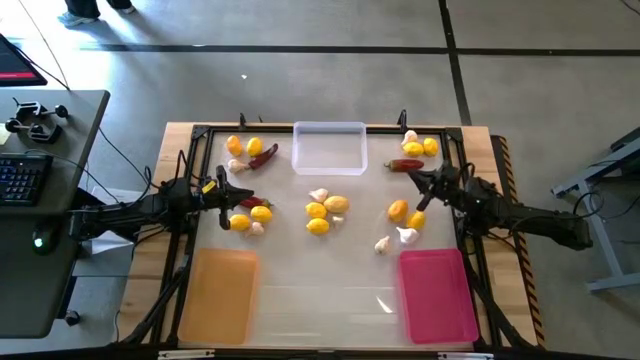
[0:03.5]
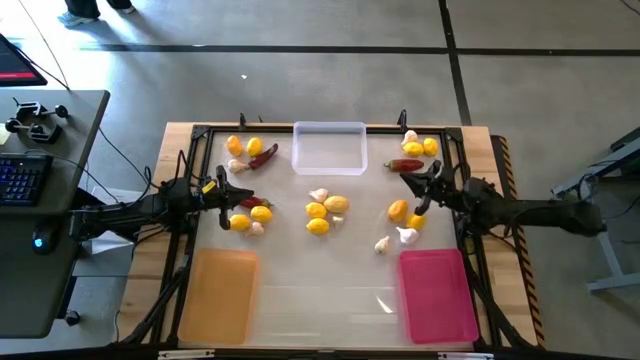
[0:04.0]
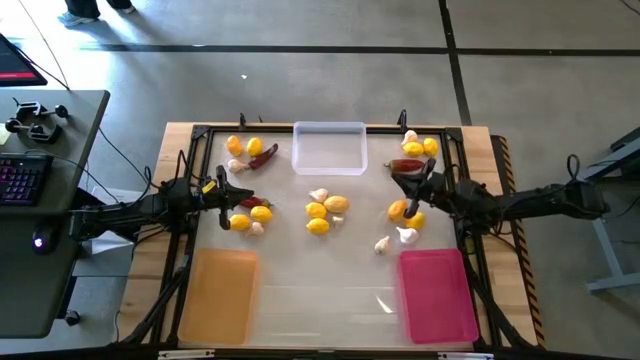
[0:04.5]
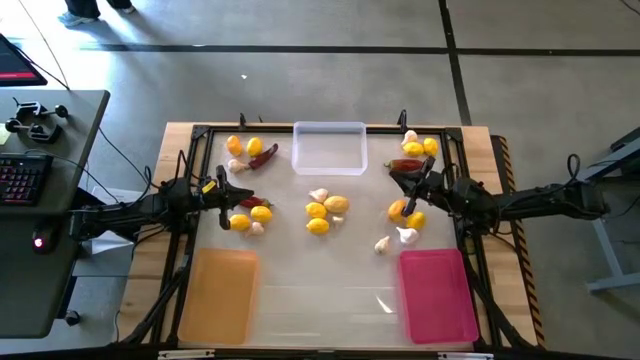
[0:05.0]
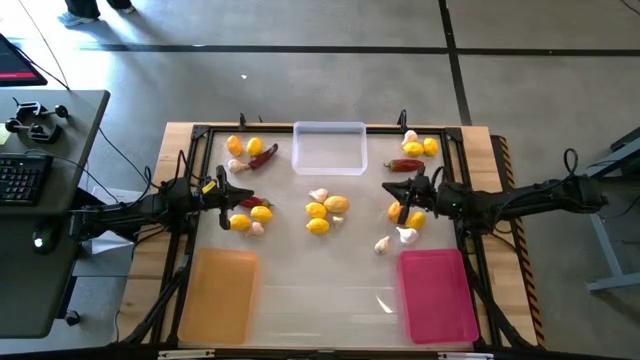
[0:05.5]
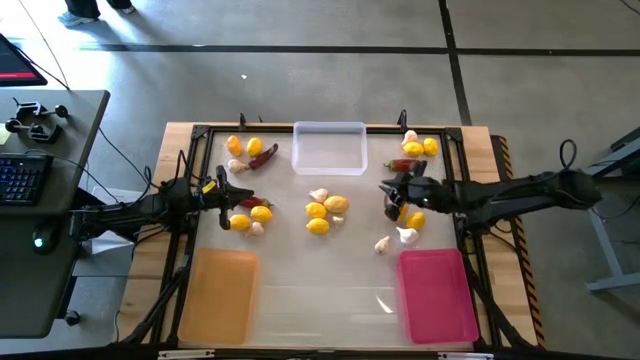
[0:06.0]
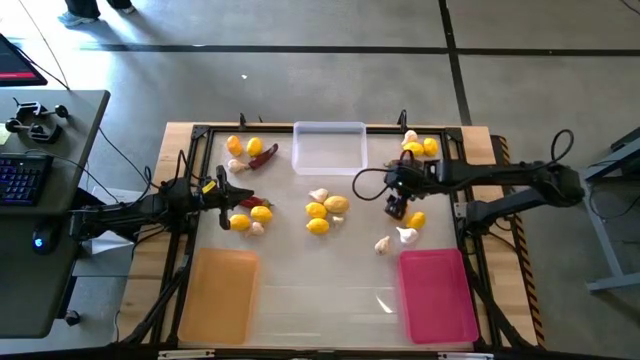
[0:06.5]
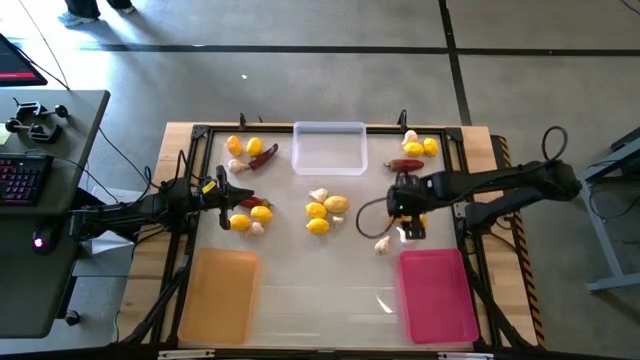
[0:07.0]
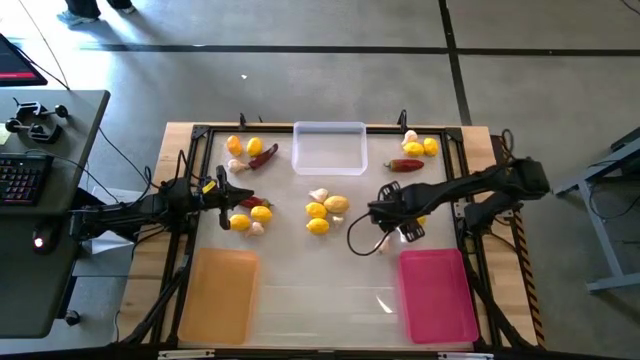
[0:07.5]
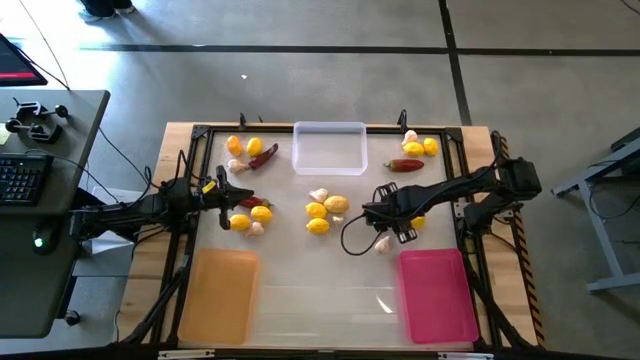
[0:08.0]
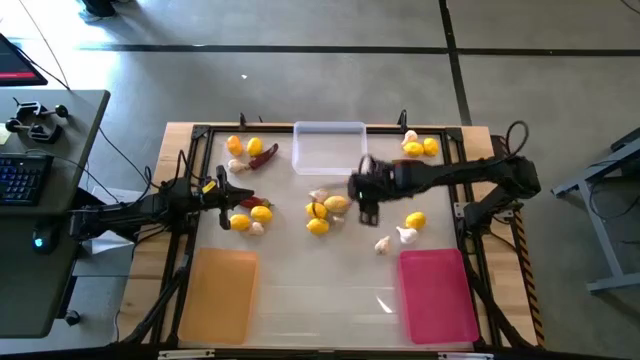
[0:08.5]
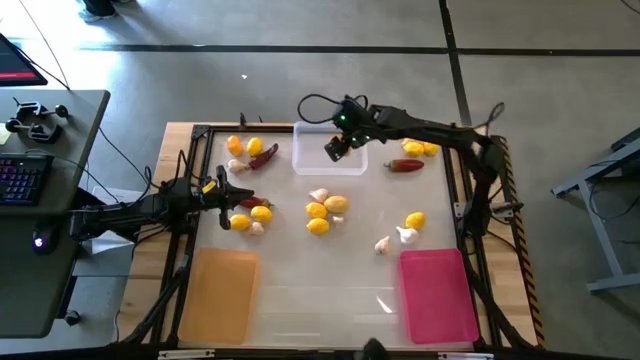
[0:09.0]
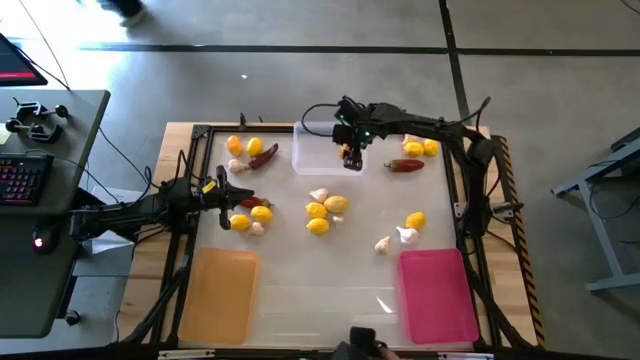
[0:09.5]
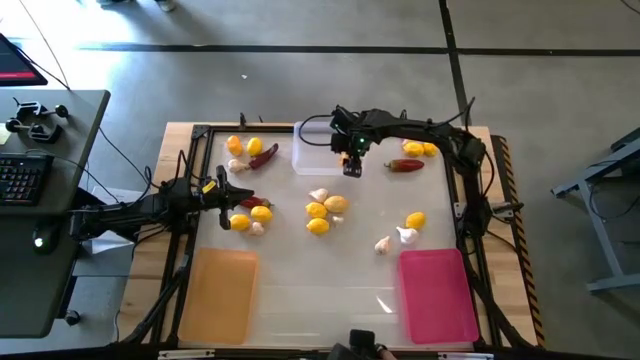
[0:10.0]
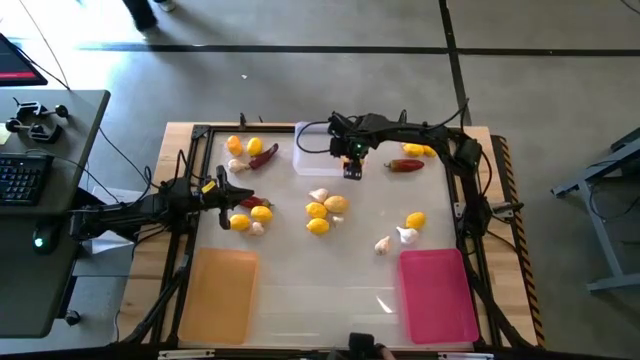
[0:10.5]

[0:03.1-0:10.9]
Task: Sort produce into baskets
Put the bottom right lemon into the transparent bin

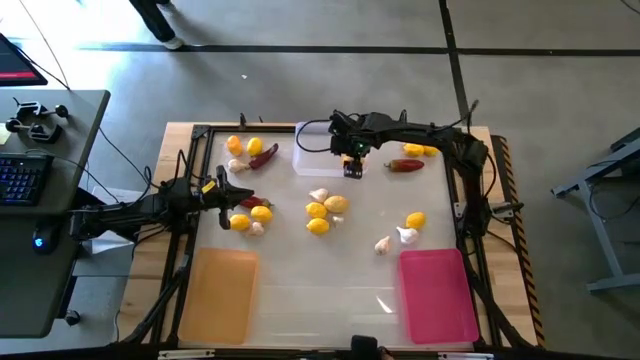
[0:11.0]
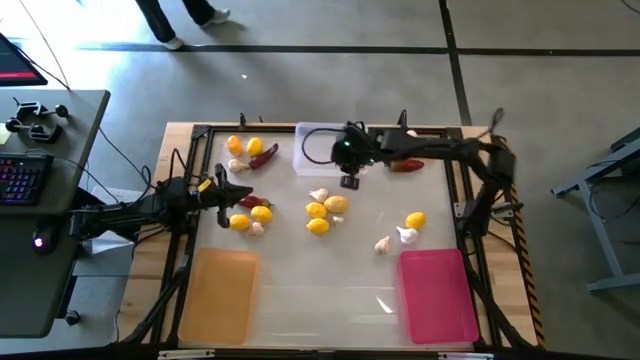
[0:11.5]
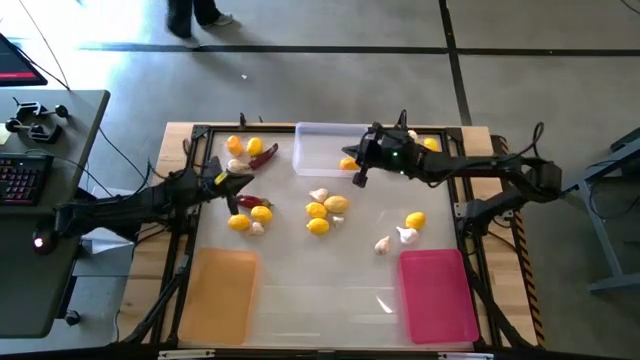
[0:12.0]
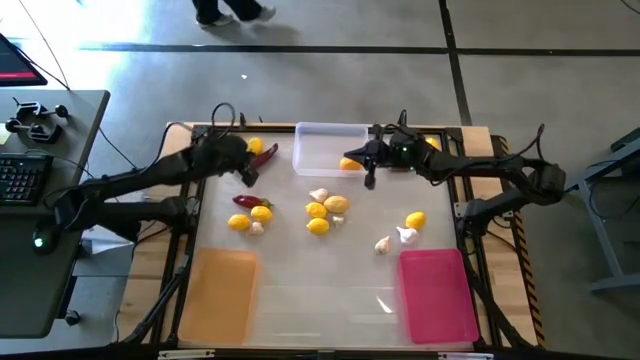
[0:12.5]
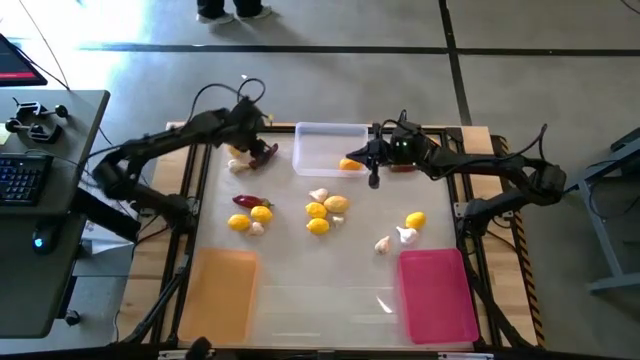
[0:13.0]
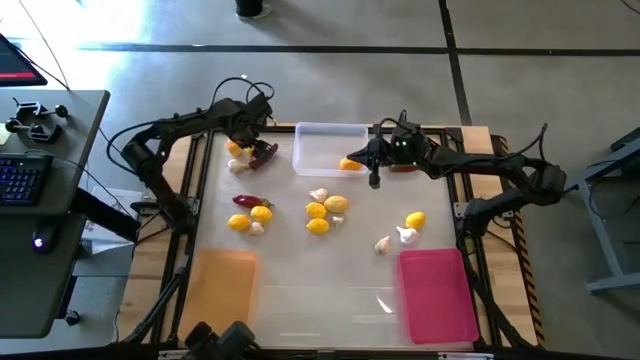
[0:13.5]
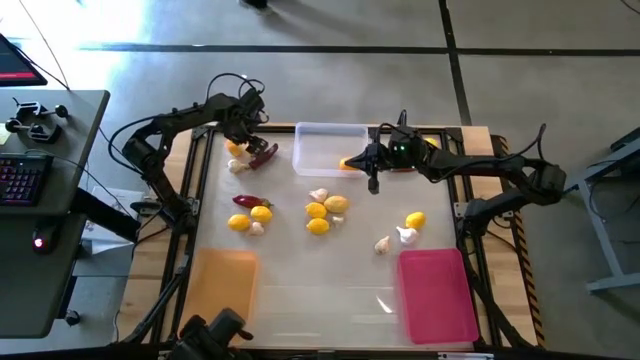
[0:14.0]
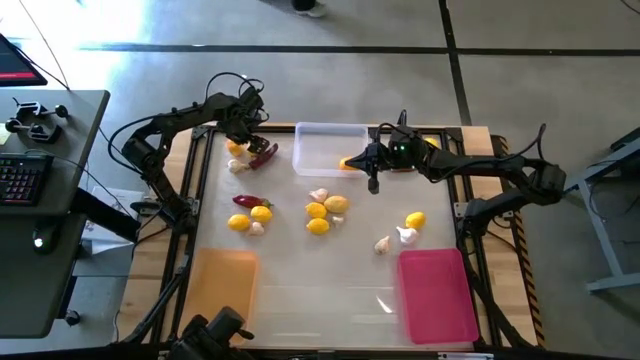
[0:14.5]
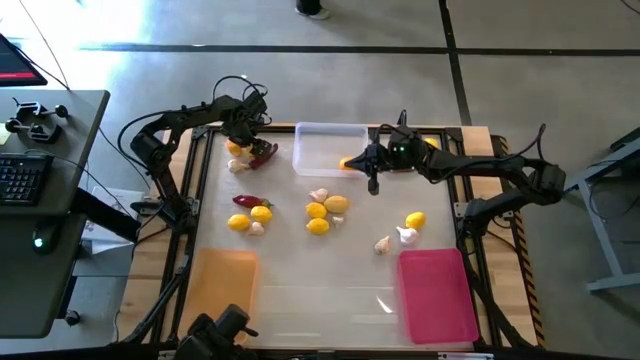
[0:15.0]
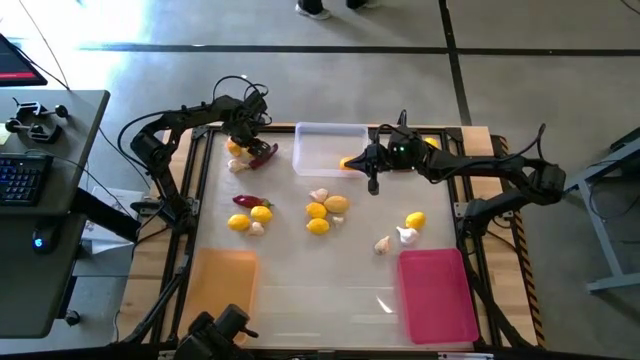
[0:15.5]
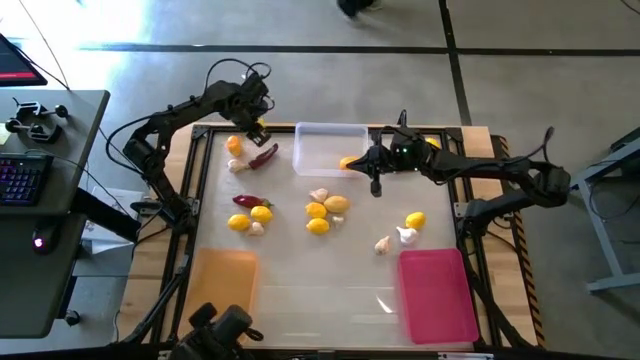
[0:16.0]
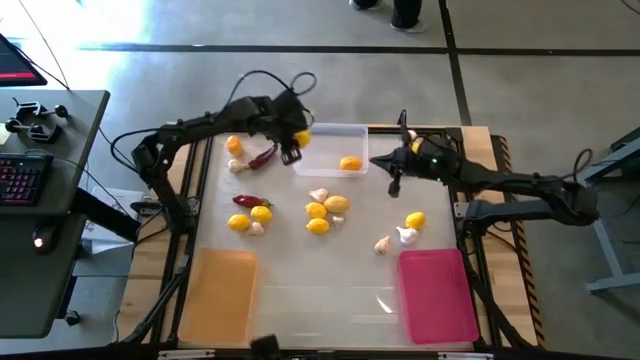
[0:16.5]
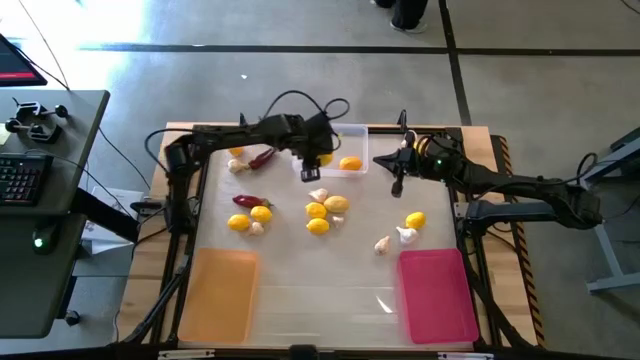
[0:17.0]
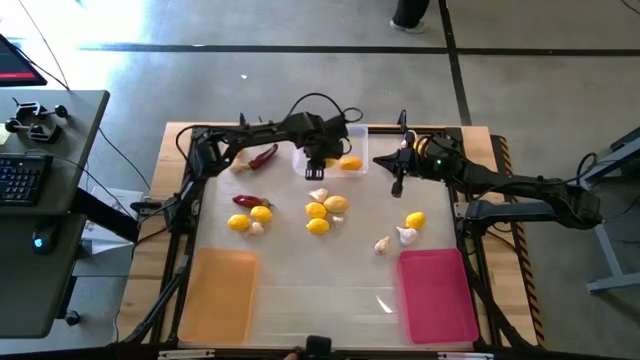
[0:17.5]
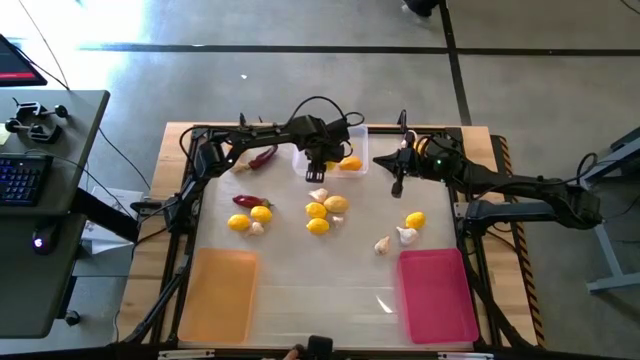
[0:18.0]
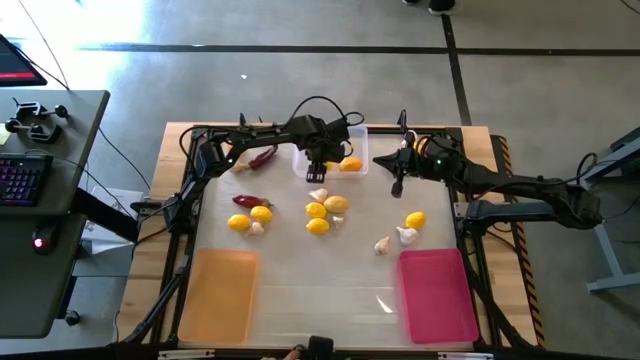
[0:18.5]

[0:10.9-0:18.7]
Put the top left lemon into the transparent bin

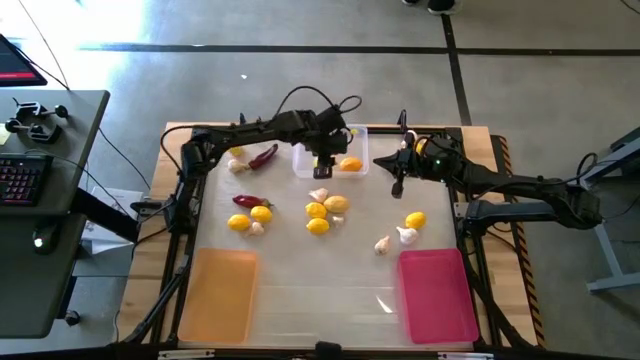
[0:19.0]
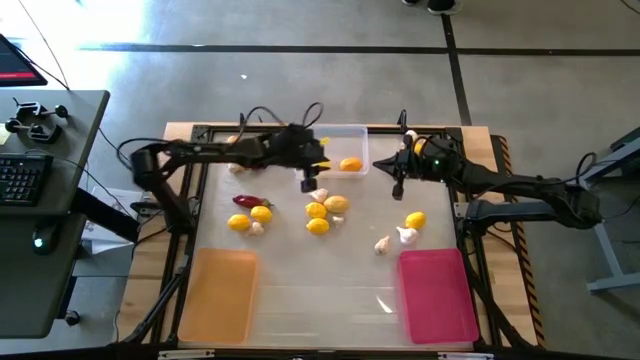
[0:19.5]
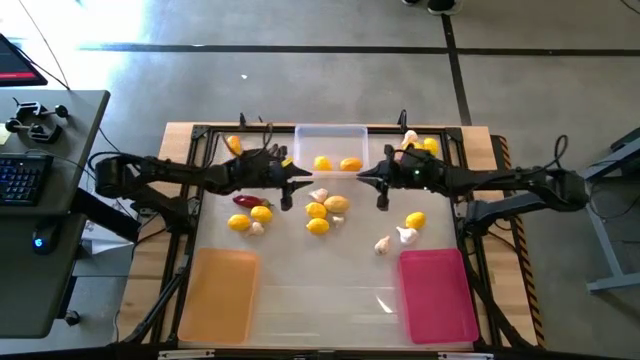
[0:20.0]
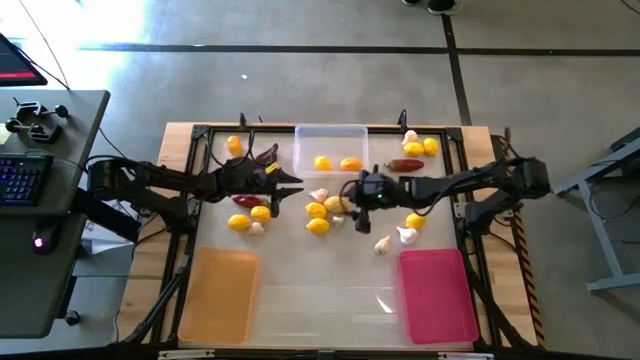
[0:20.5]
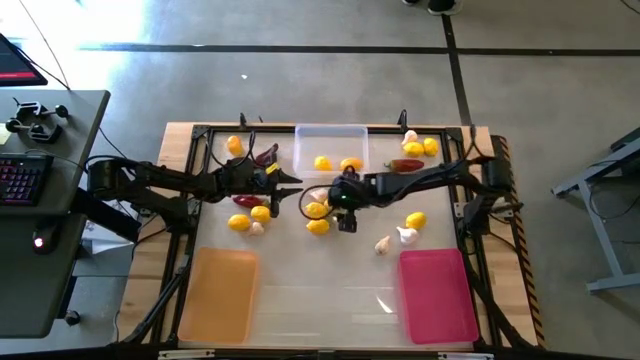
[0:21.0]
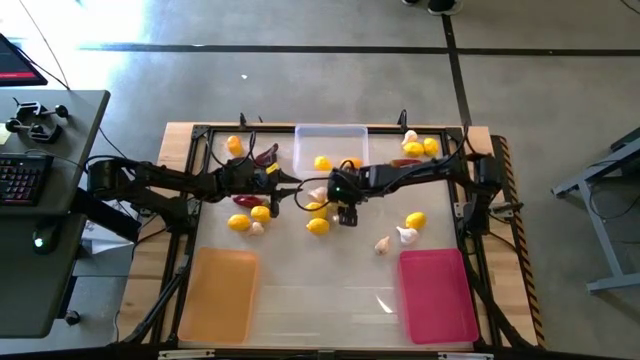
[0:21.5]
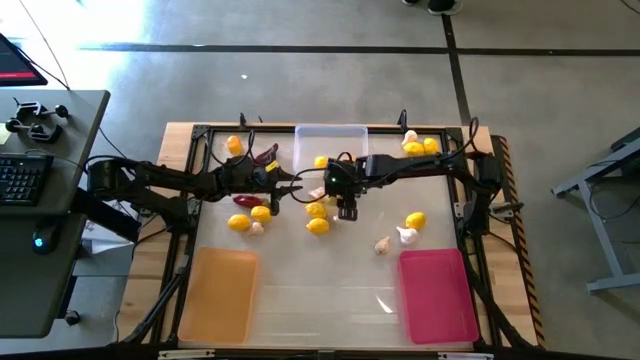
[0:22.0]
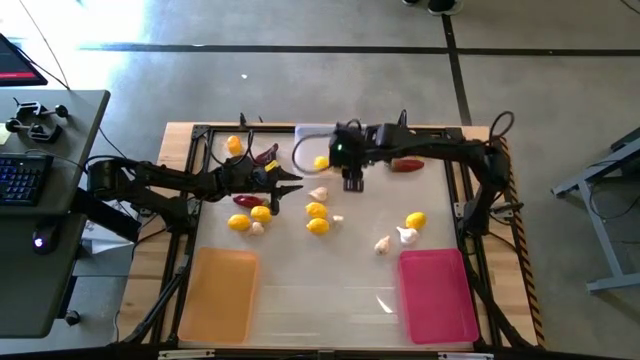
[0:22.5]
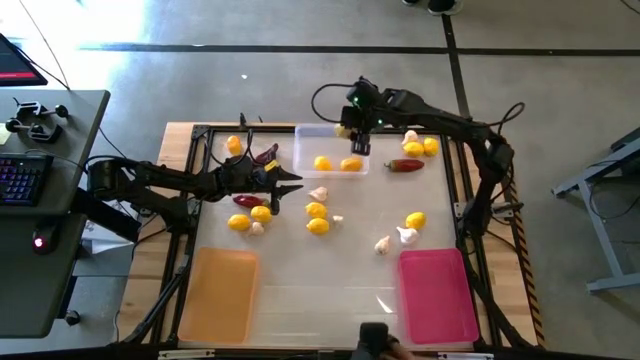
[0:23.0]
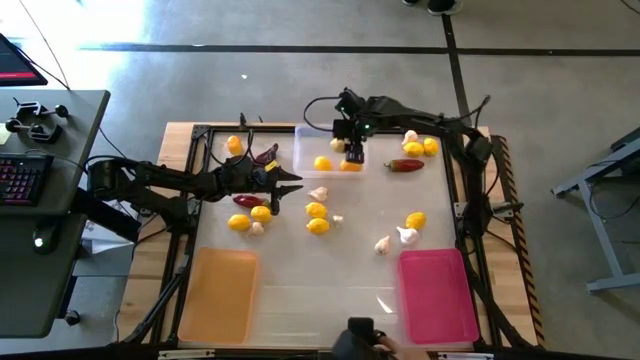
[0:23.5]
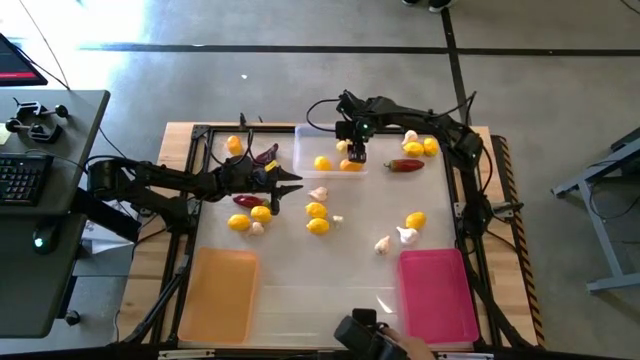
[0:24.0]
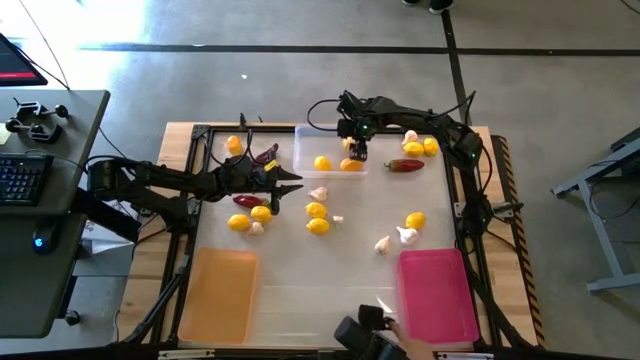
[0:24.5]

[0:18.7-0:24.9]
Put the top center lemon into the transparent bin
